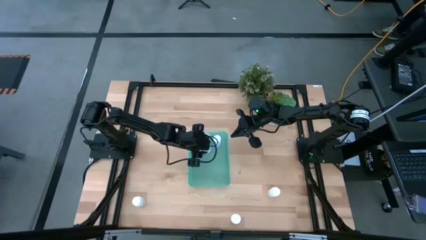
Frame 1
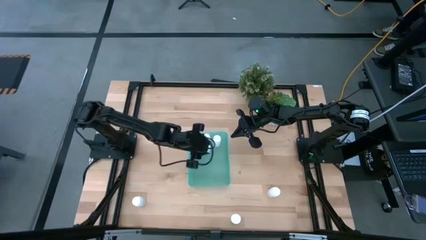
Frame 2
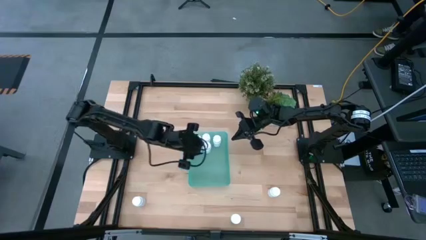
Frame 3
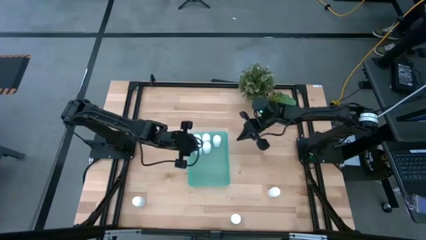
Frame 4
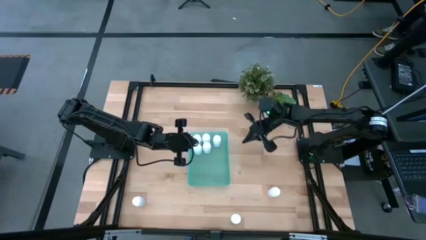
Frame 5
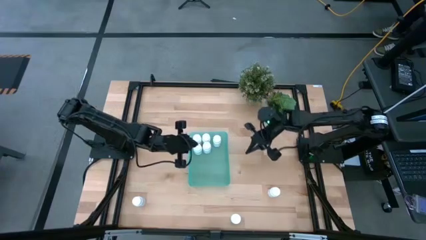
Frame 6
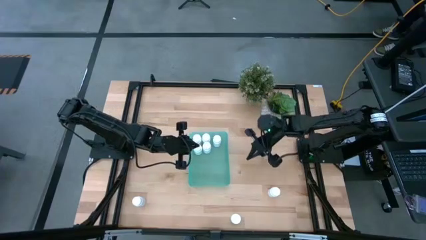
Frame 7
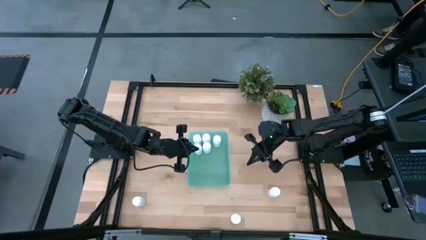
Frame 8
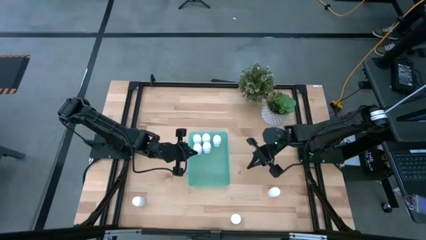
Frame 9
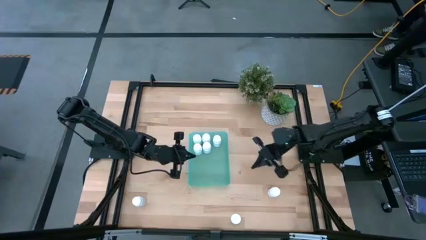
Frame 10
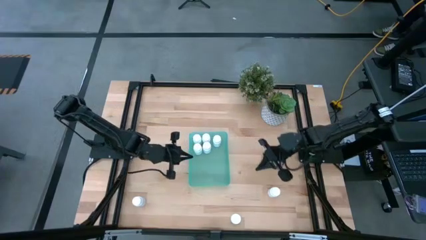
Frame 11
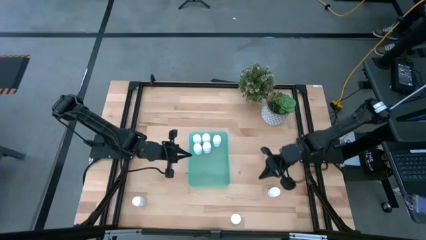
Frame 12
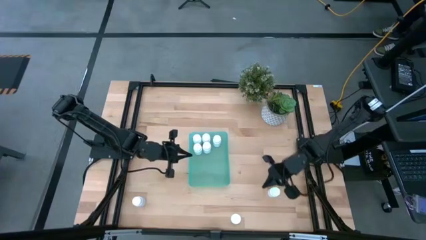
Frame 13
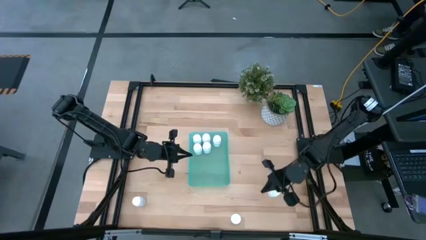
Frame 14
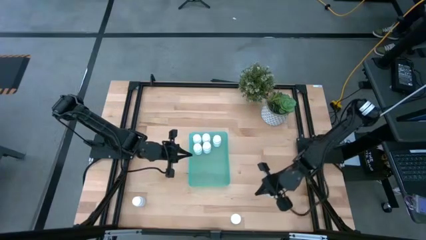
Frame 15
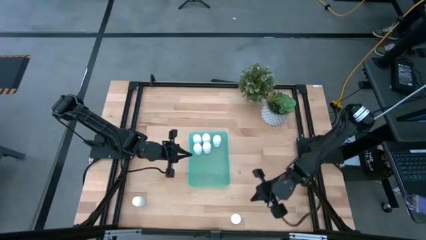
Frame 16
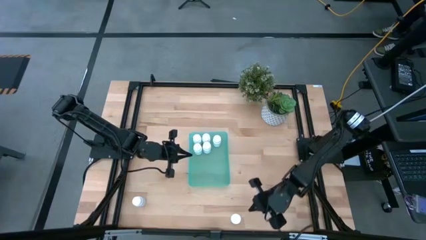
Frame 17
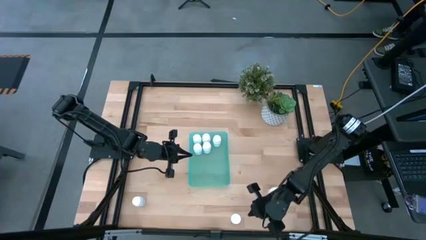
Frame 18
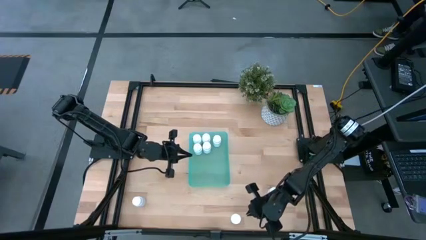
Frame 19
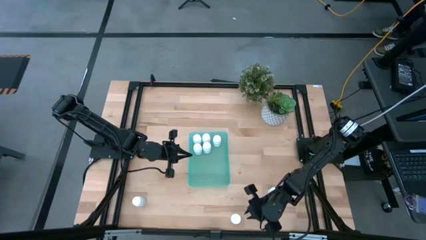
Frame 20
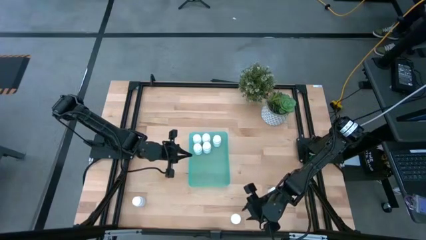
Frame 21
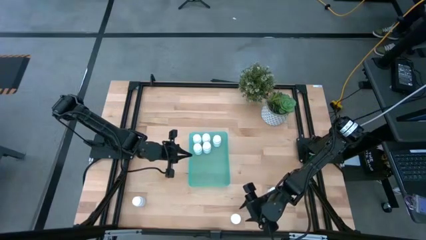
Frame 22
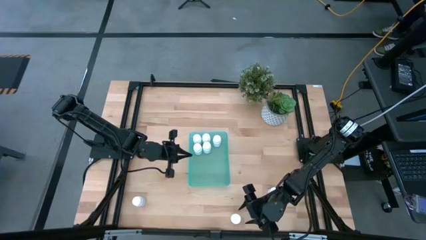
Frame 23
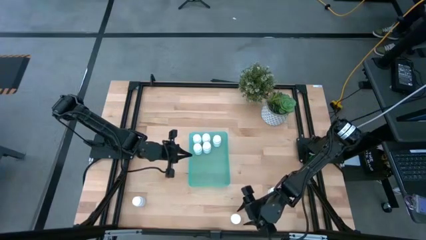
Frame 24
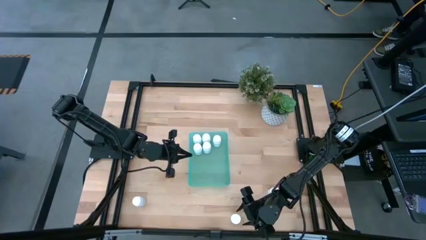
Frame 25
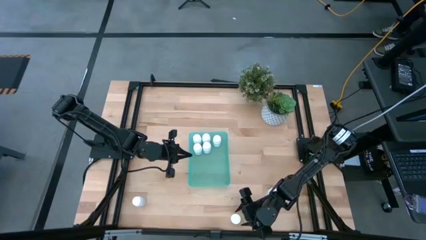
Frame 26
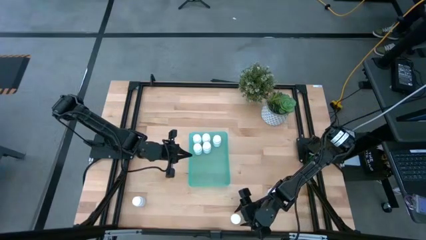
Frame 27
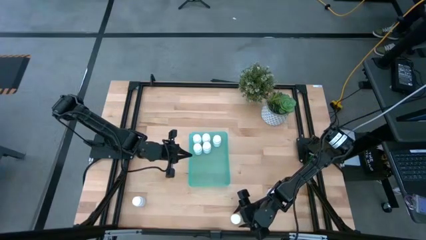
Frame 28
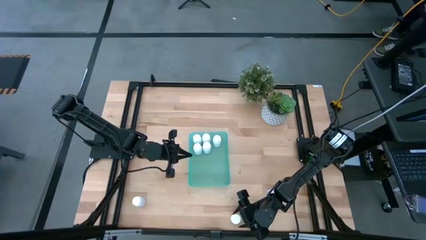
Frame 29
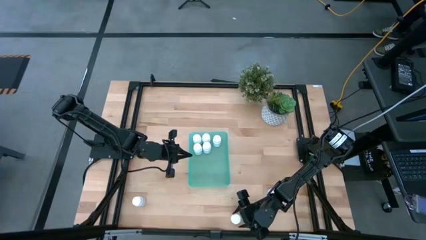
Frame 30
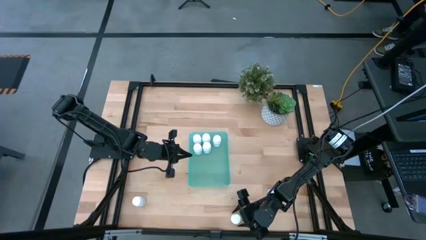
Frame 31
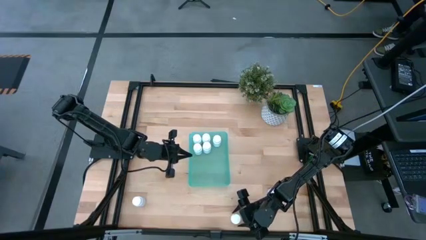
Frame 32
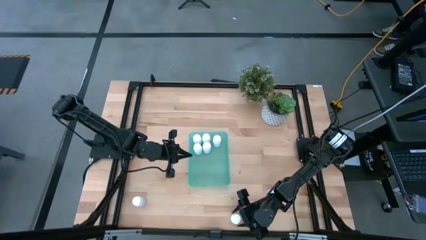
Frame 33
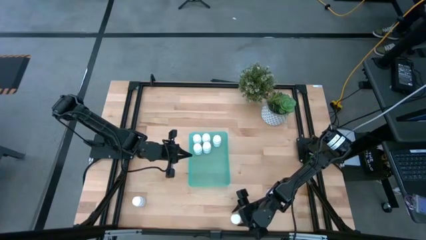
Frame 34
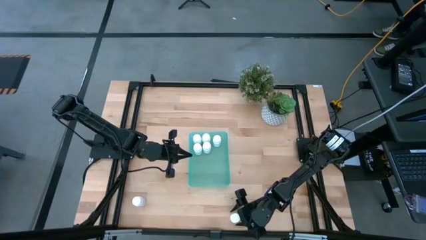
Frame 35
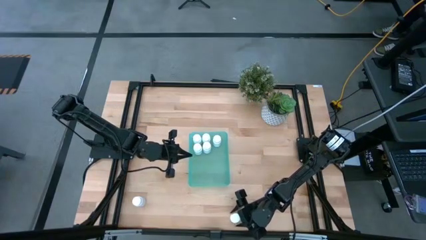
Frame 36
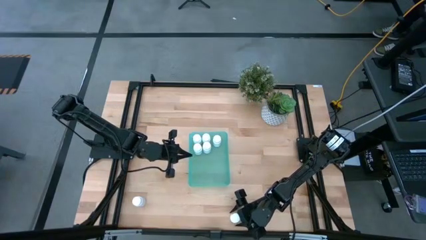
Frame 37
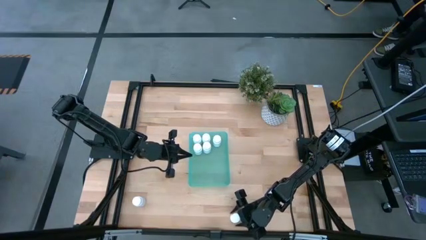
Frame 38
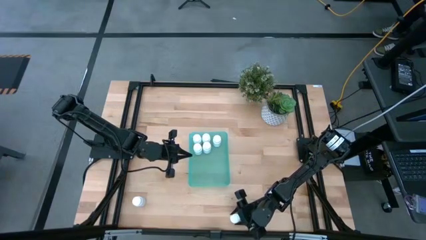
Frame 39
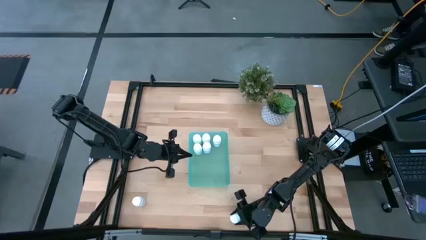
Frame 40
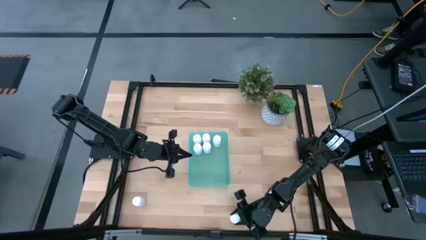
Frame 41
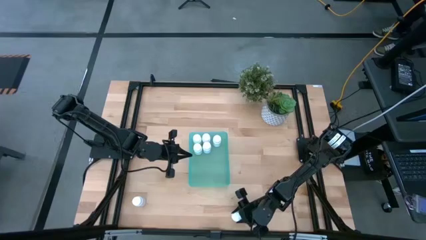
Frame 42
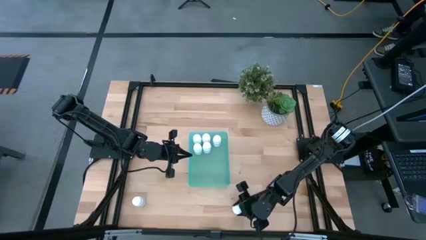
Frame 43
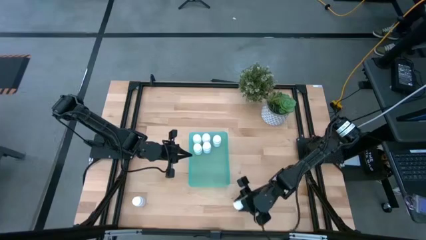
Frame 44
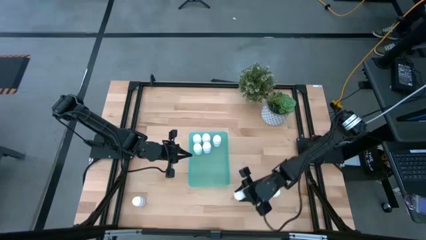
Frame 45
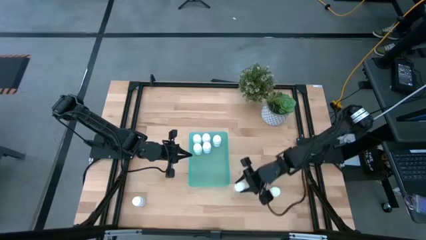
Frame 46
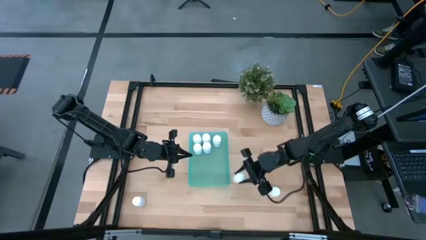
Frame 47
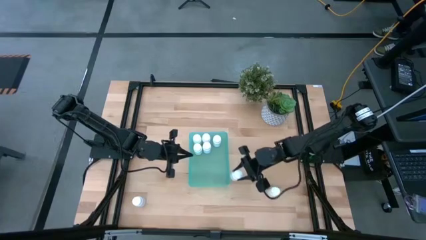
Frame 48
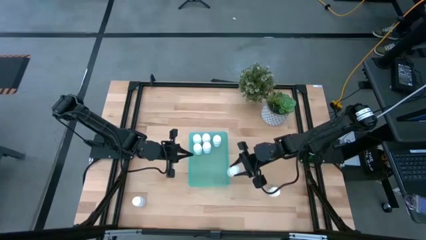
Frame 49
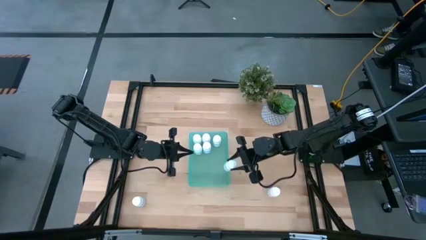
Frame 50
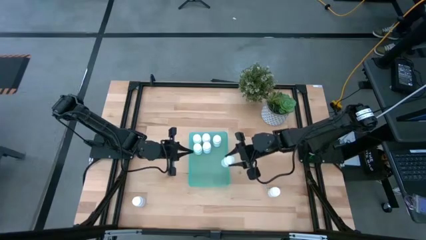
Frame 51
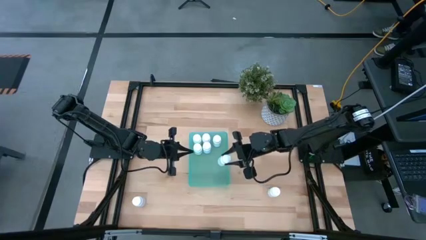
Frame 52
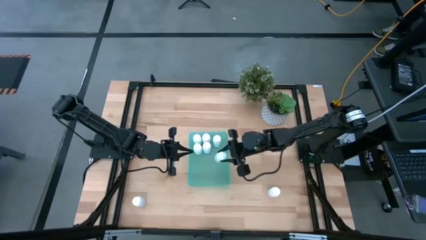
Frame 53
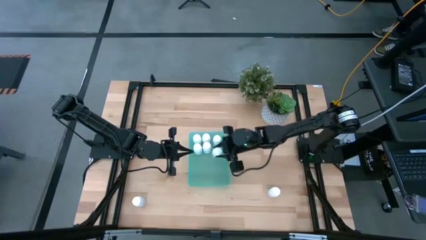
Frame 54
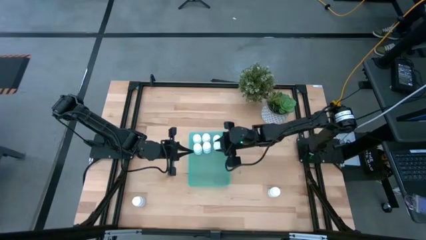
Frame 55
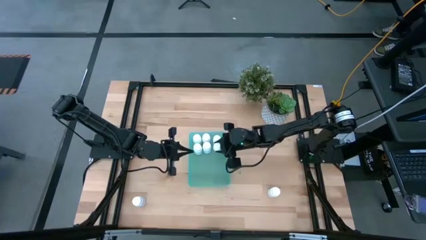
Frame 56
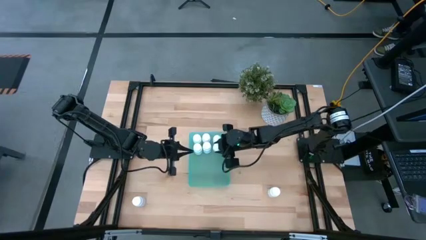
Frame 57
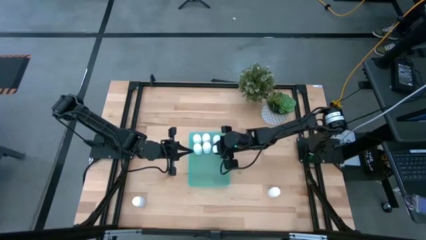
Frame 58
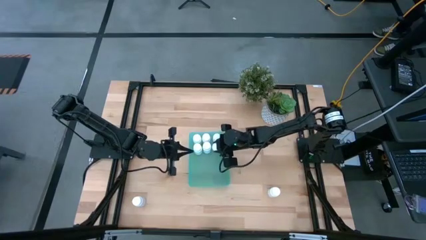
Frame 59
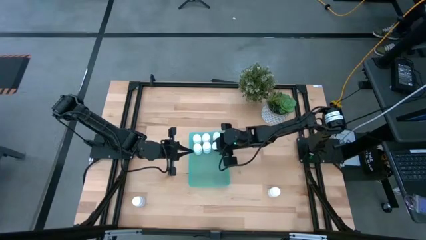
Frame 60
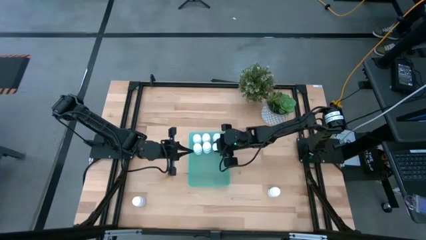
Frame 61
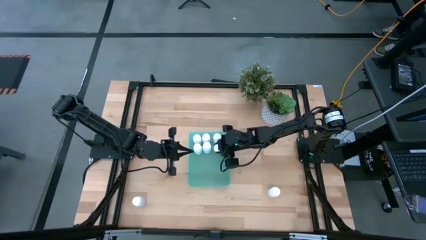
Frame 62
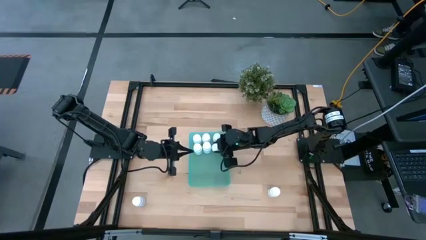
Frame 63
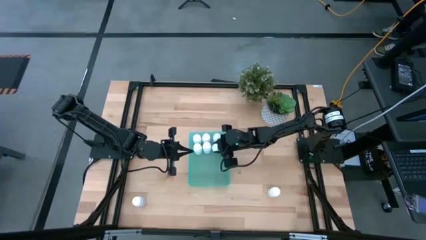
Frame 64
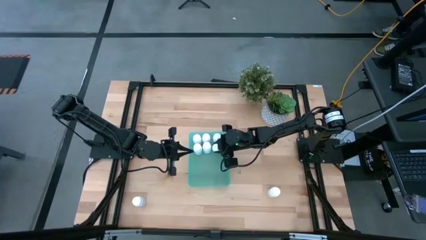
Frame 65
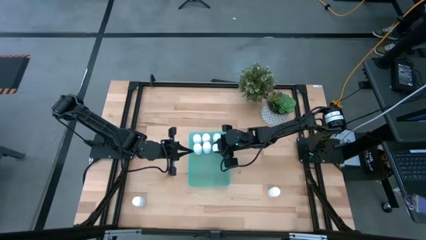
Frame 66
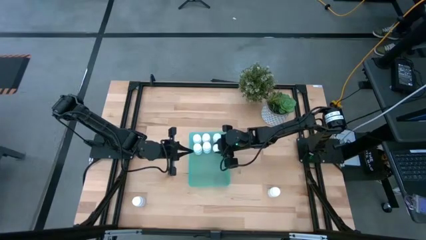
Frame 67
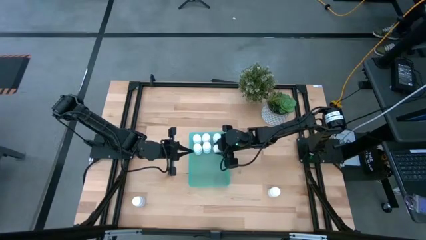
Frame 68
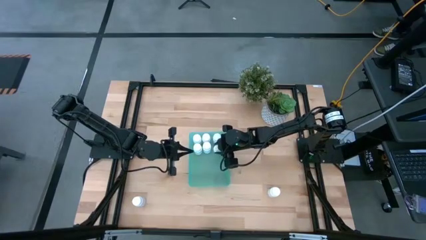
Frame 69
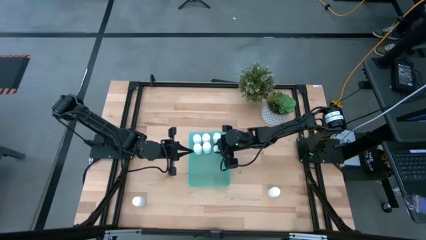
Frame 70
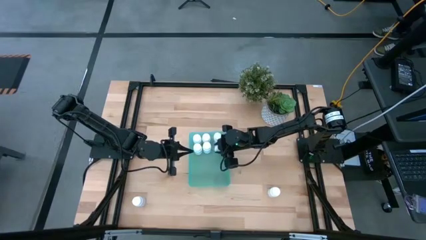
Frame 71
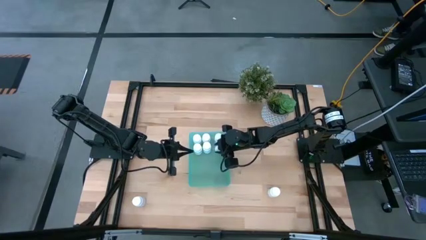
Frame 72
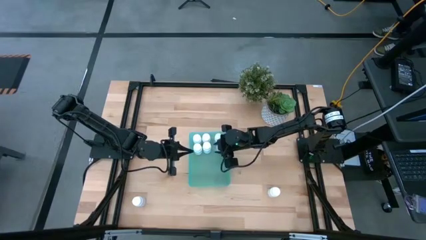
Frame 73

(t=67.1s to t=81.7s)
Task: Pick and place pill bottles into a basket
Put the white pill bottle into the green bin

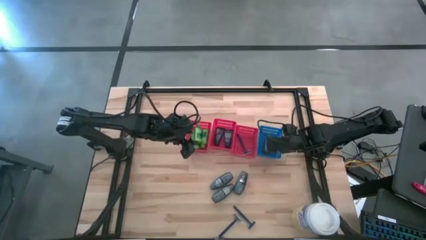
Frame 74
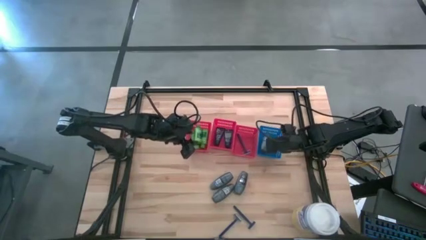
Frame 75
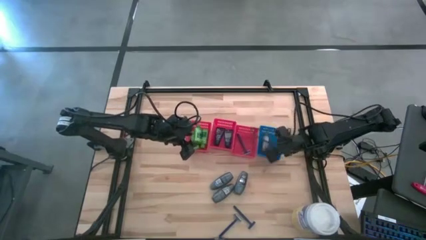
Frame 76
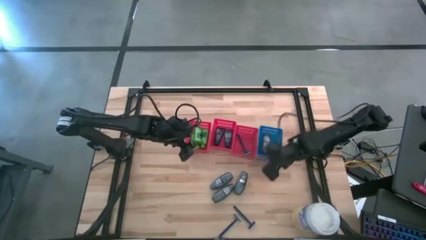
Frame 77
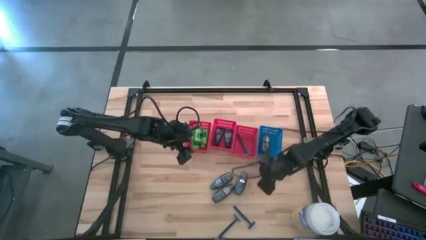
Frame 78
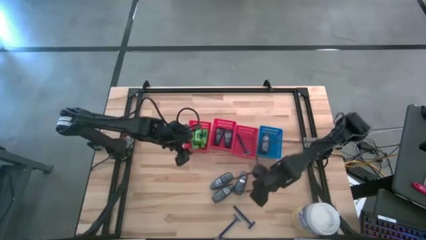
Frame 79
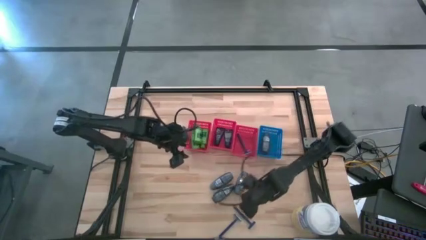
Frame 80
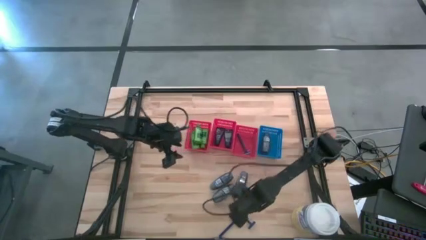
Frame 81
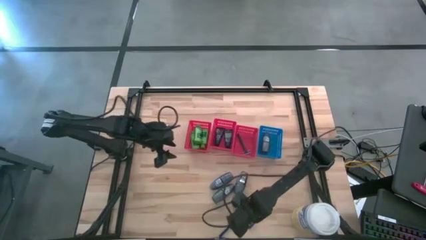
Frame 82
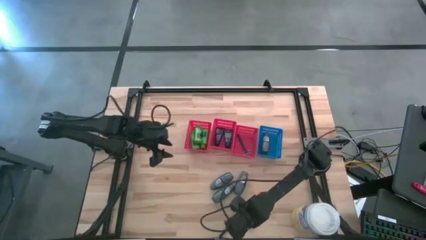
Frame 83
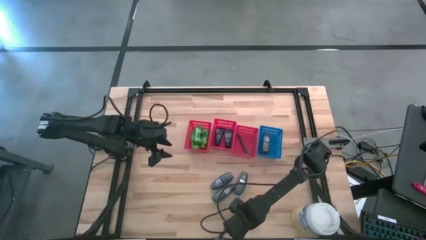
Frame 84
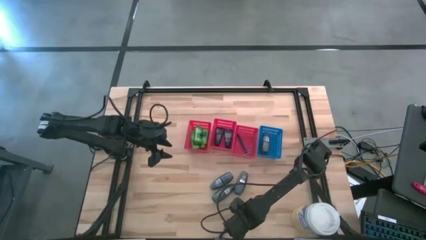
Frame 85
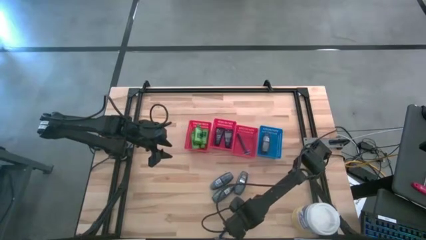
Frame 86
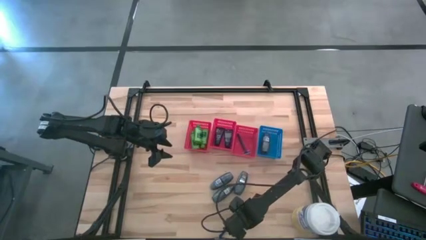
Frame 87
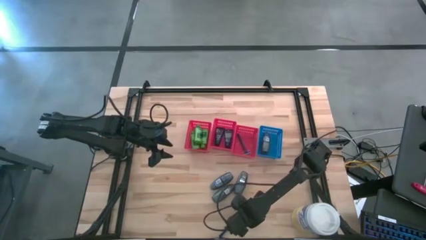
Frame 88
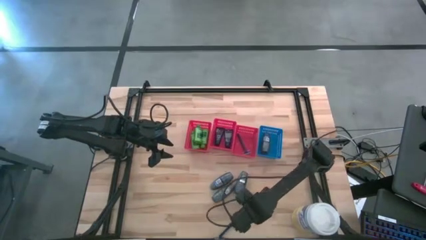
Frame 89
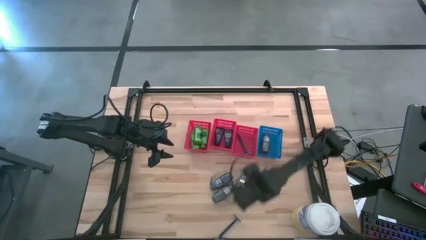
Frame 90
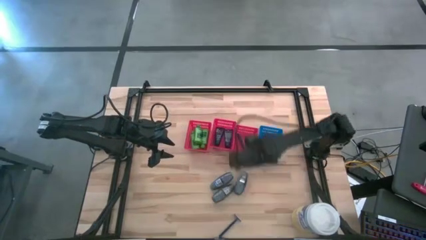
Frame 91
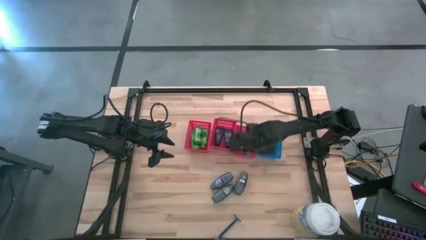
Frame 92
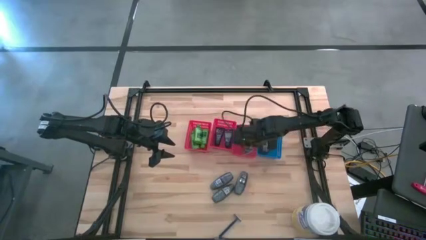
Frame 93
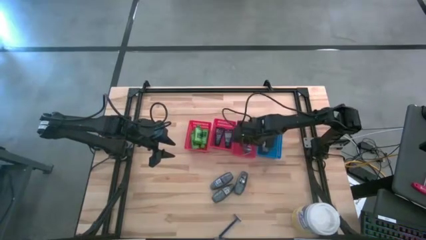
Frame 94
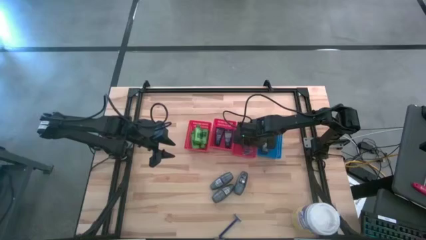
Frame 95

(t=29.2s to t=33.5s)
Task: Pick & Place Travel size toiletries
Put the blue razor in the right red bin
